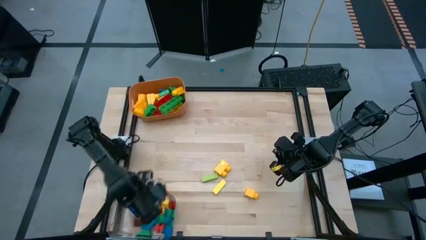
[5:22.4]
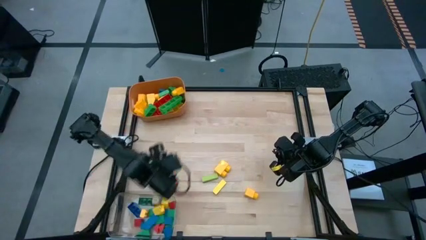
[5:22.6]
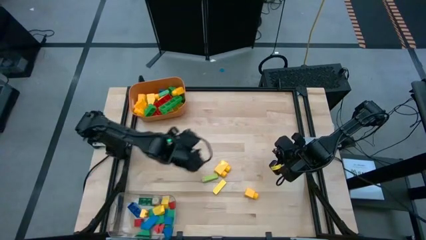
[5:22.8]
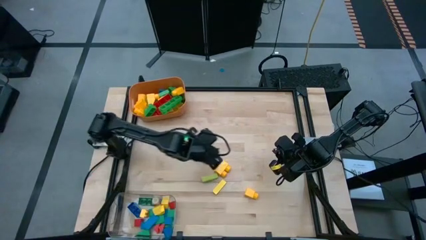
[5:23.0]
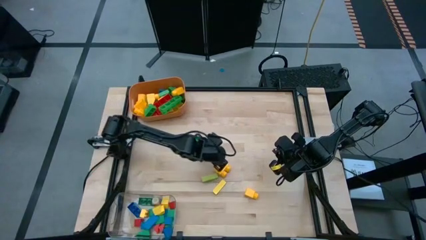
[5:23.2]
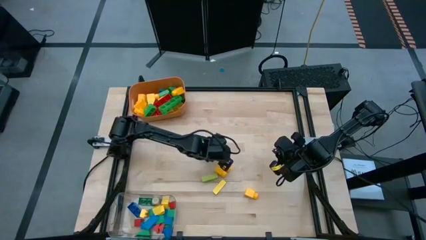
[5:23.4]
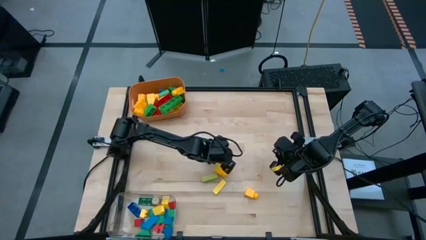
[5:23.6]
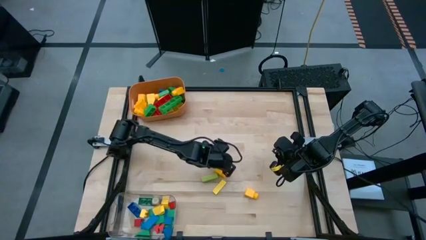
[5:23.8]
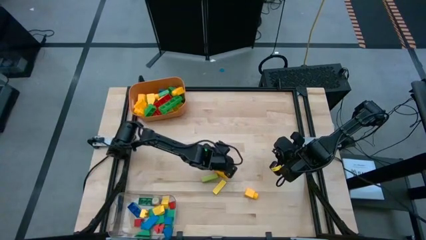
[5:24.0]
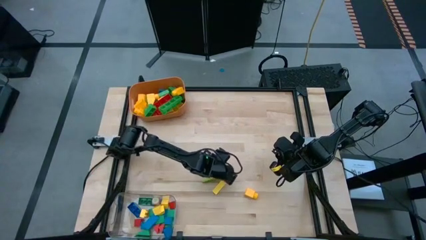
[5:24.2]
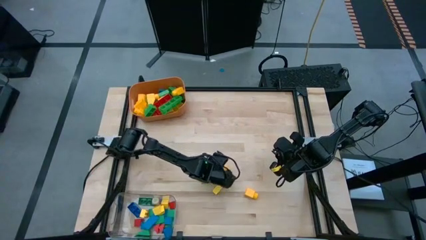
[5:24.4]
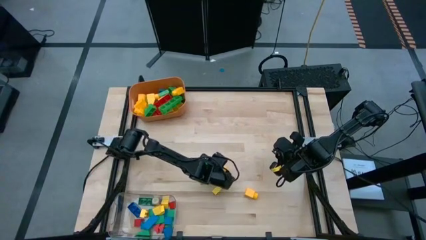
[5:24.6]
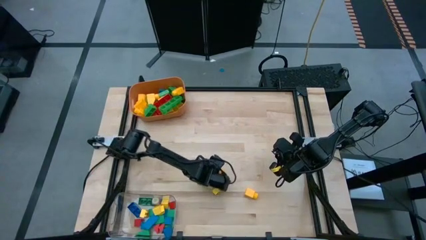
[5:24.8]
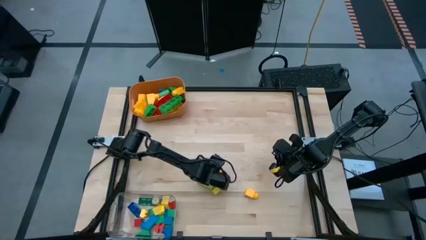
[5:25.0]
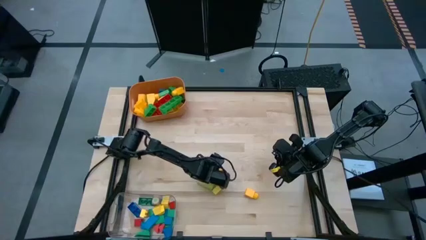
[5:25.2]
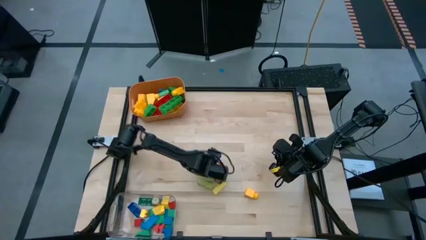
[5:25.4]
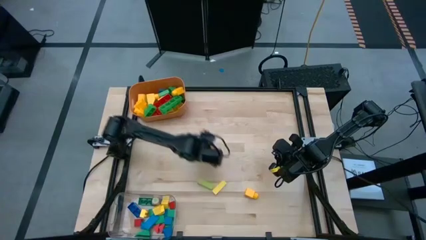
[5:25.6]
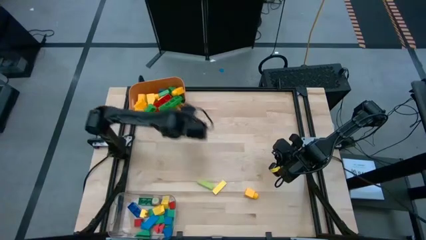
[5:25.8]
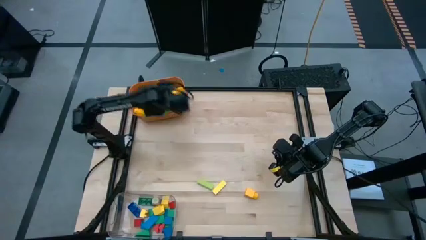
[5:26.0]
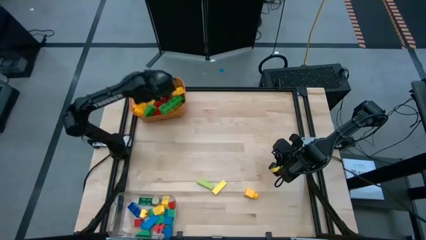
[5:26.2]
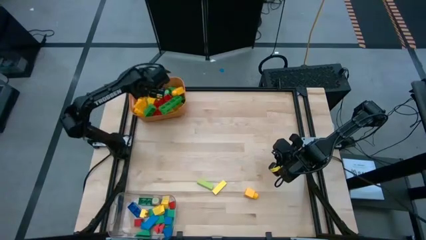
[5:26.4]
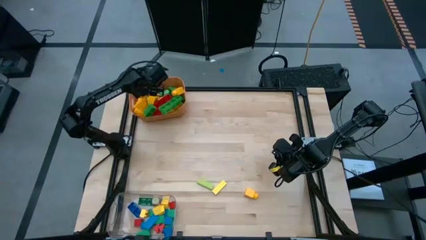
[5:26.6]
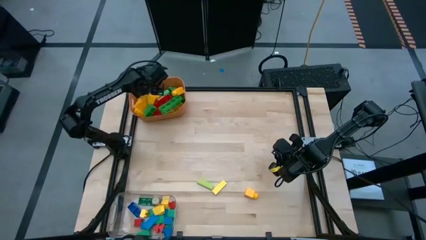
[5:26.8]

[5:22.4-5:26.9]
Task: Sort blocks by size
Put the big yellow game piece into the orange bin

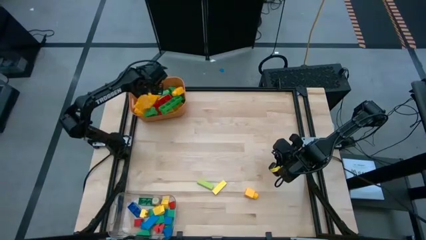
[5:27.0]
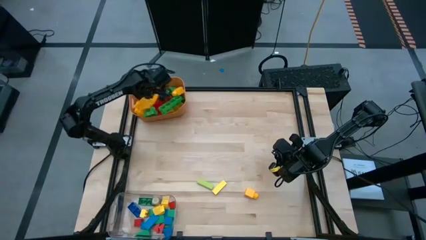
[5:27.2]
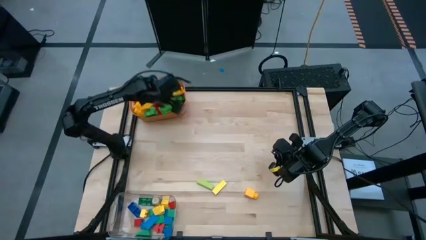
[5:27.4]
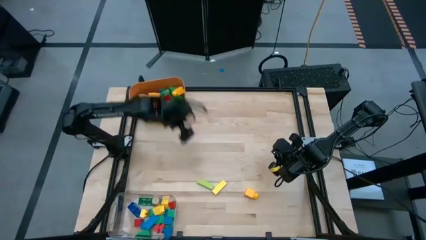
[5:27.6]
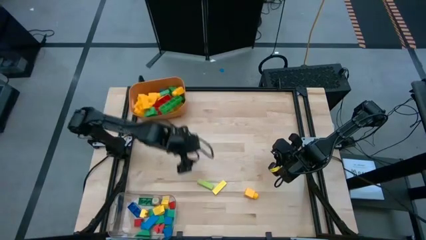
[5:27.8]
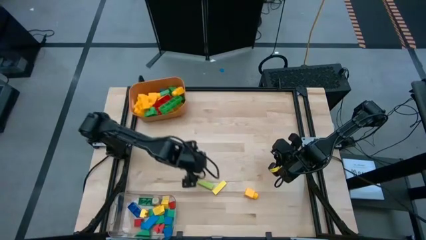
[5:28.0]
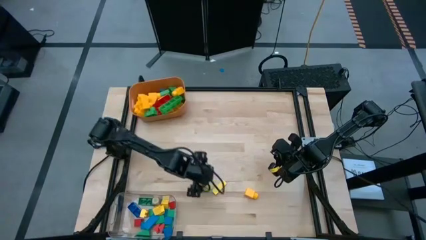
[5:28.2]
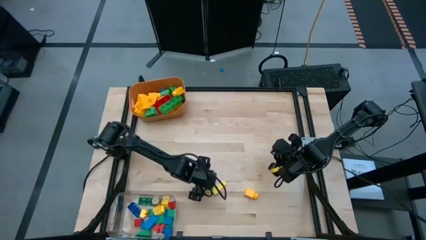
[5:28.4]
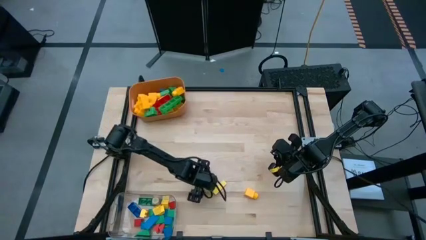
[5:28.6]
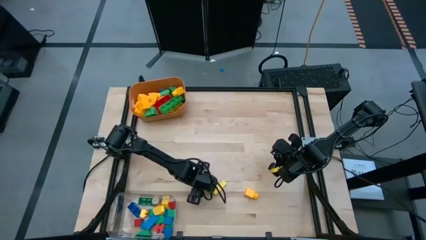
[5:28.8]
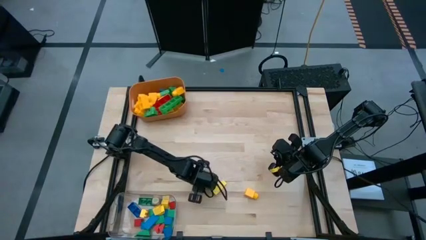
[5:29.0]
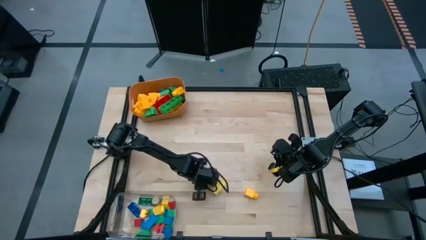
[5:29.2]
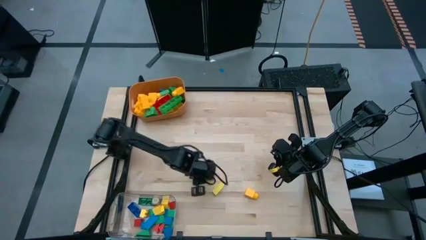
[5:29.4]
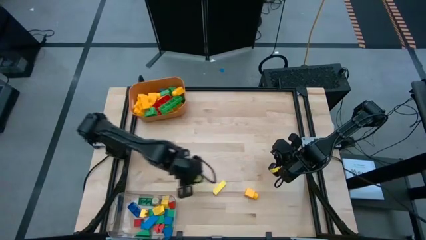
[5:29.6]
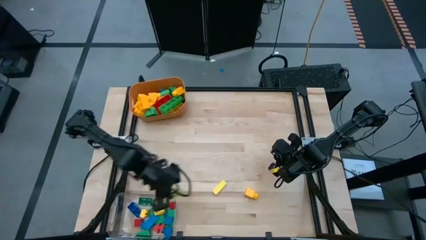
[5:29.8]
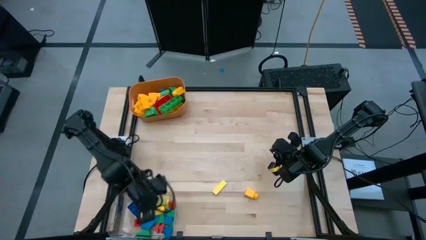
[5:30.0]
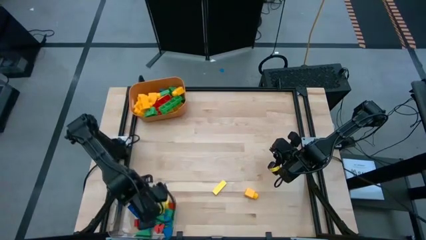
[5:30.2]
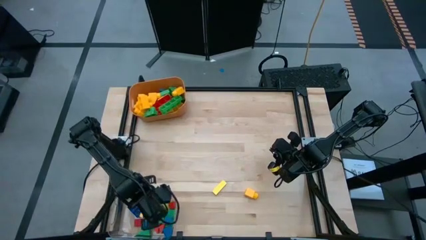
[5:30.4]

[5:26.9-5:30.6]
Put the big light green block into the transparent bin

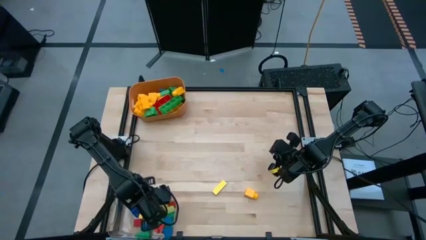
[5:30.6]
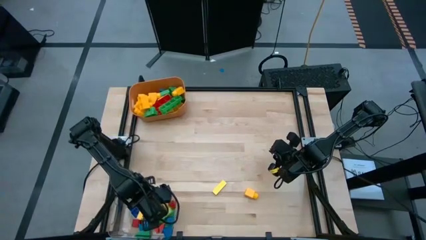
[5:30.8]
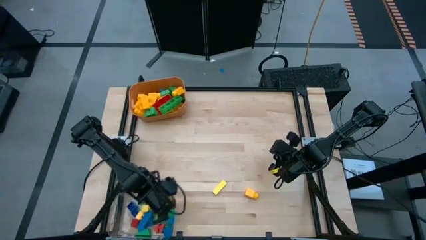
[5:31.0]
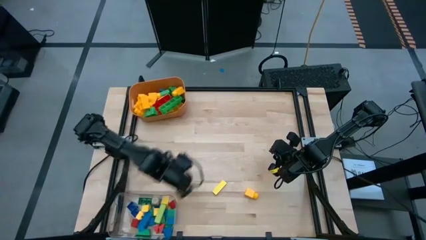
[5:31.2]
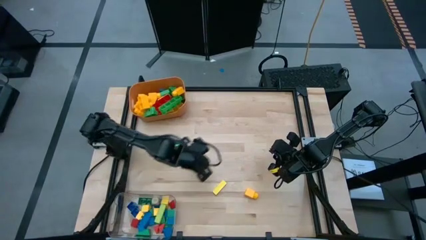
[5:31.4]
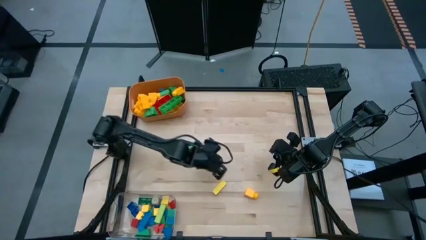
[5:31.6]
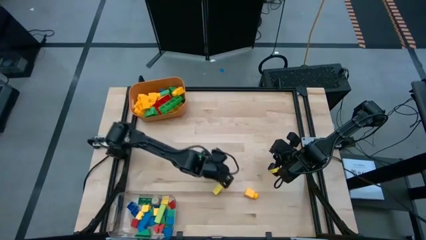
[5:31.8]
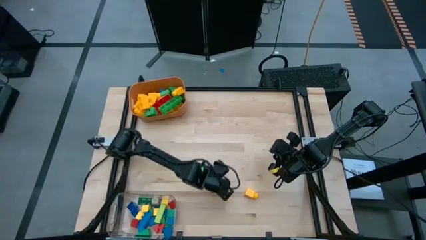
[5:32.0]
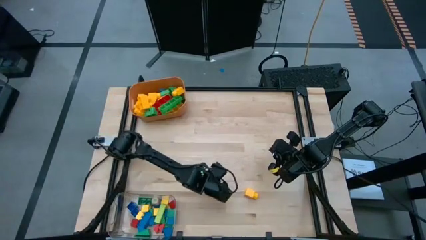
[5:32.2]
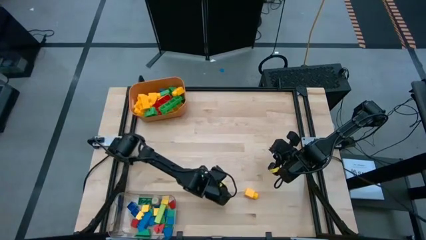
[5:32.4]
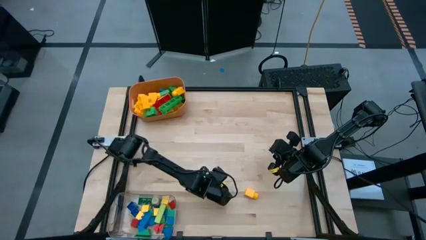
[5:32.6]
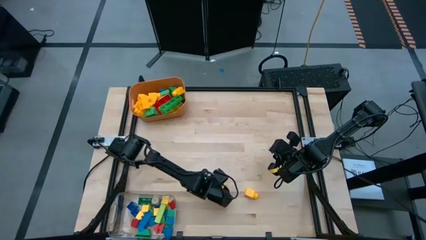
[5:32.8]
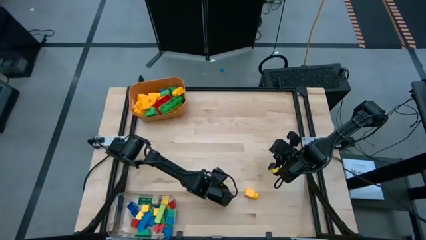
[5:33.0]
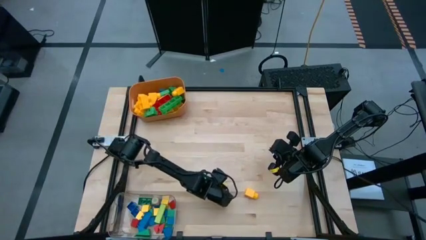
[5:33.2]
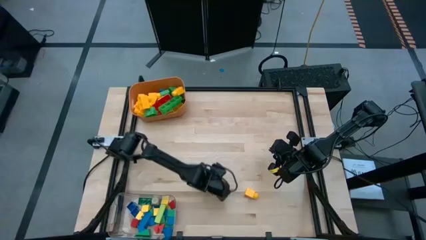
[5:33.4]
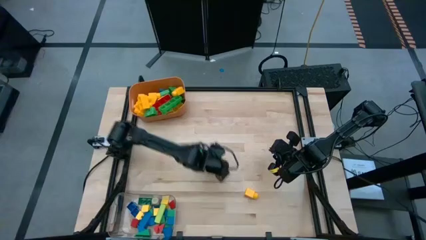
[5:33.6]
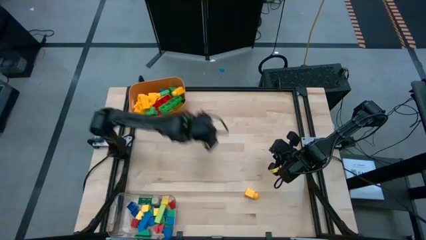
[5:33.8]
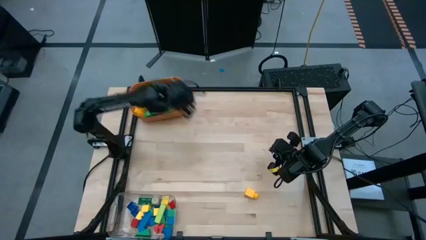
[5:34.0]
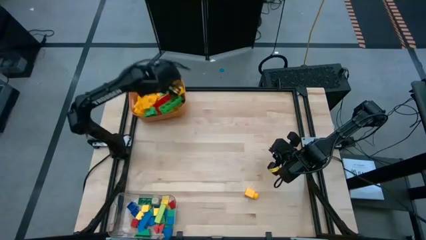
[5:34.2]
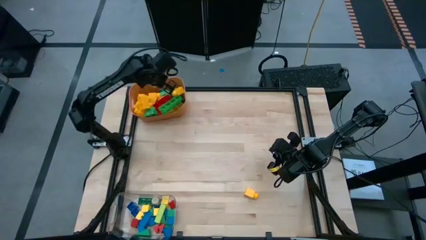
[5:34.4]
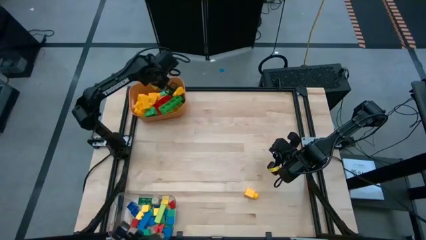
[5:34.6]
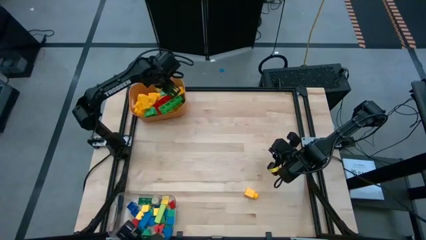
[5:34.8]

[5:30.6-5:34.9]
Put the big yellow block into the orange bin

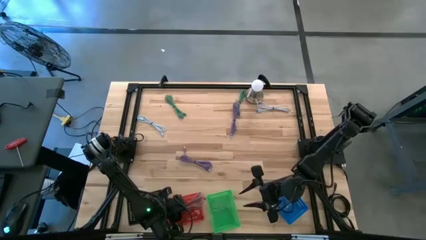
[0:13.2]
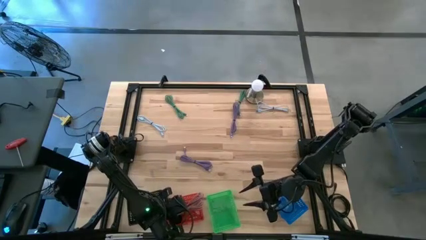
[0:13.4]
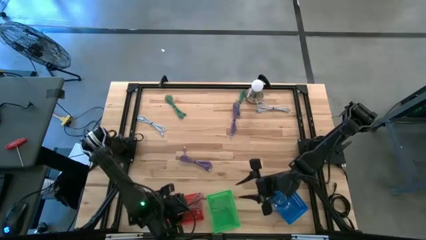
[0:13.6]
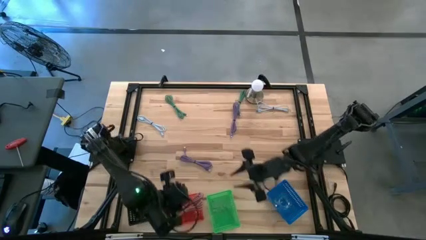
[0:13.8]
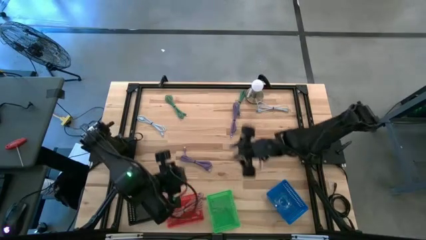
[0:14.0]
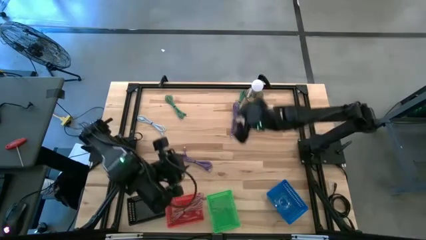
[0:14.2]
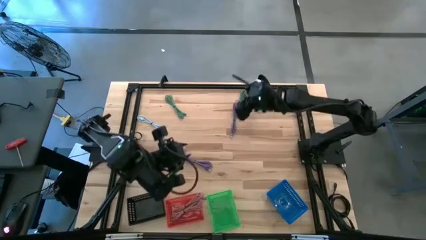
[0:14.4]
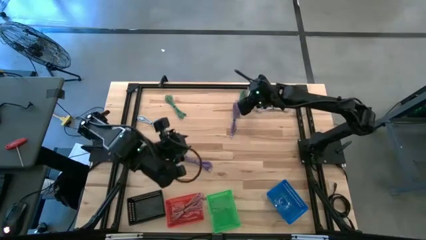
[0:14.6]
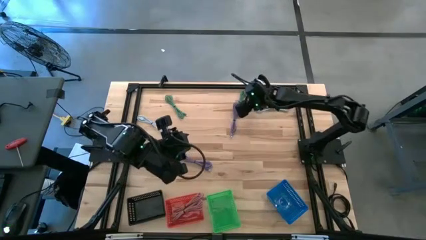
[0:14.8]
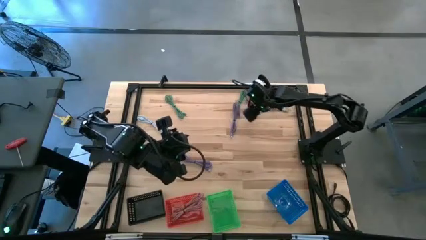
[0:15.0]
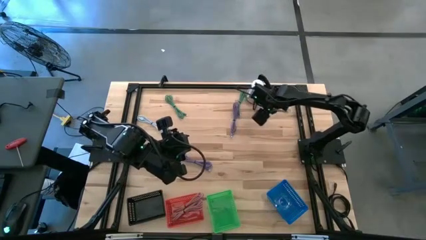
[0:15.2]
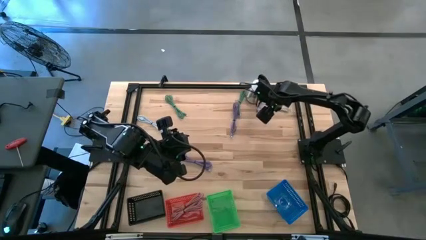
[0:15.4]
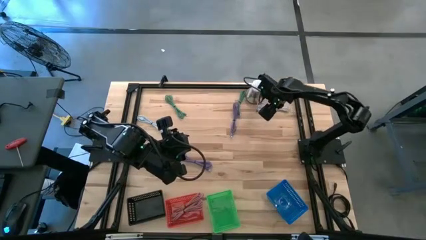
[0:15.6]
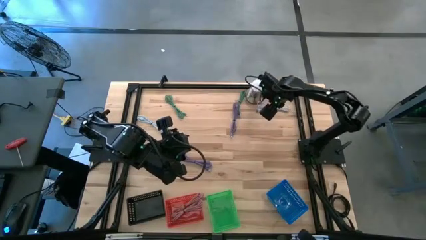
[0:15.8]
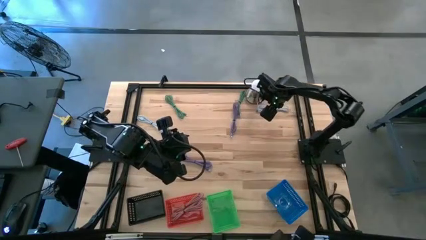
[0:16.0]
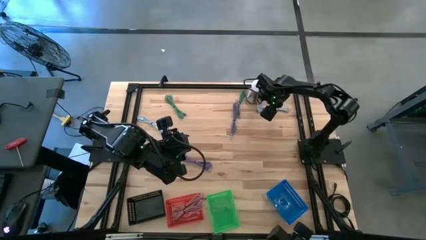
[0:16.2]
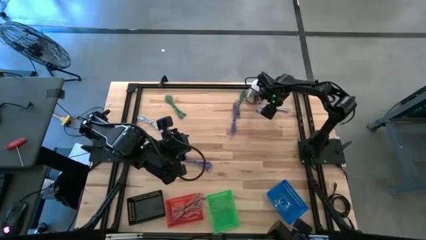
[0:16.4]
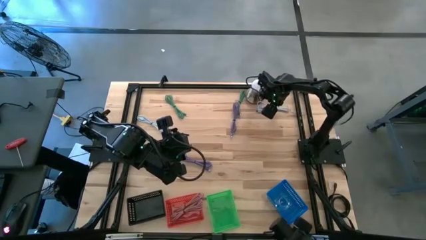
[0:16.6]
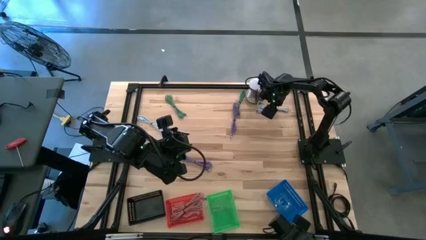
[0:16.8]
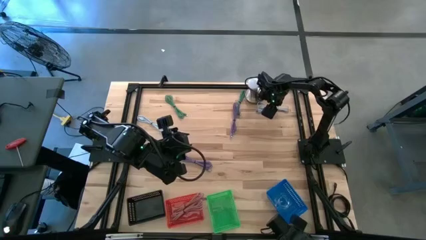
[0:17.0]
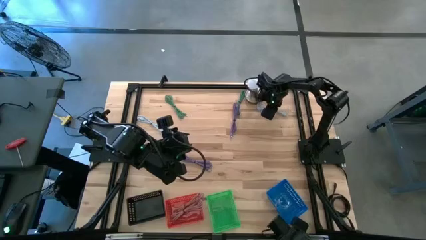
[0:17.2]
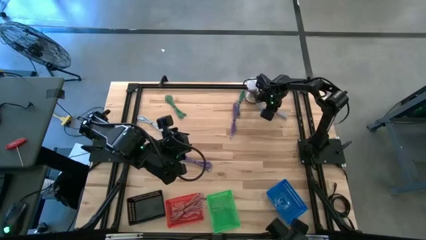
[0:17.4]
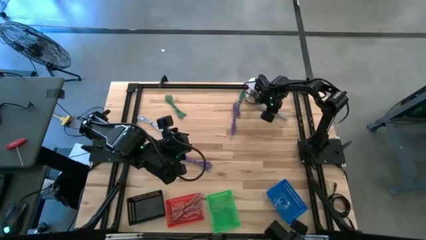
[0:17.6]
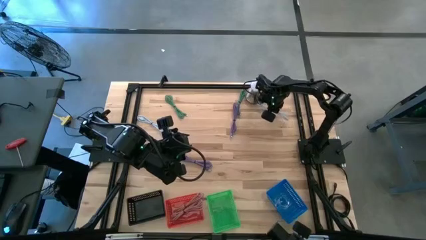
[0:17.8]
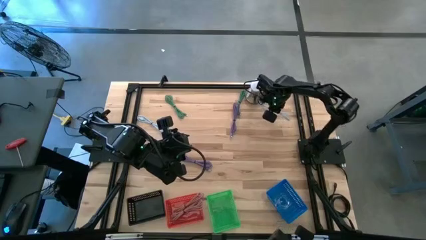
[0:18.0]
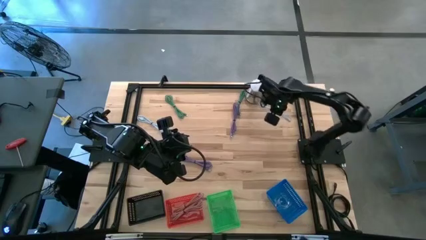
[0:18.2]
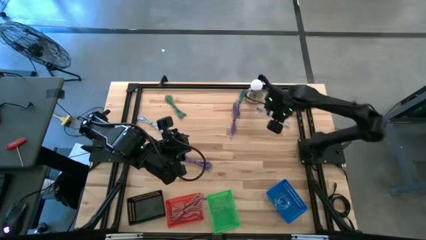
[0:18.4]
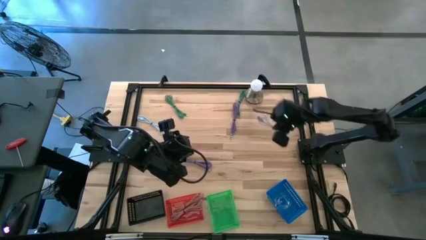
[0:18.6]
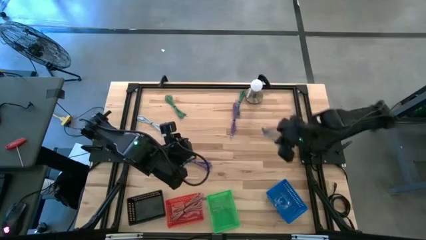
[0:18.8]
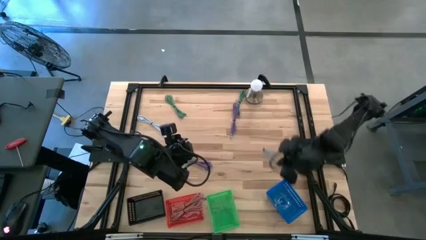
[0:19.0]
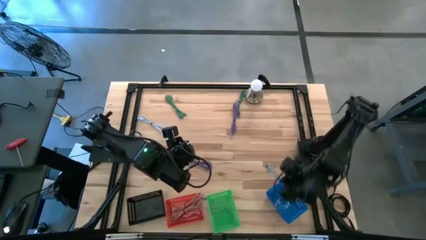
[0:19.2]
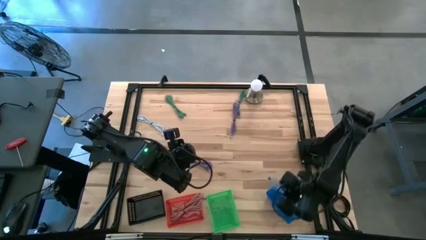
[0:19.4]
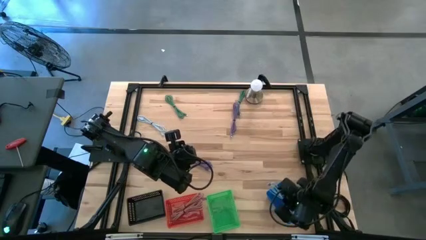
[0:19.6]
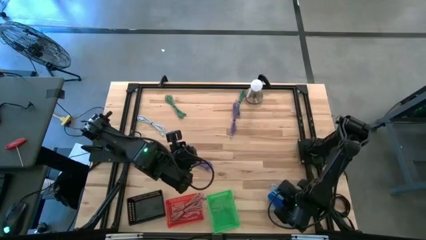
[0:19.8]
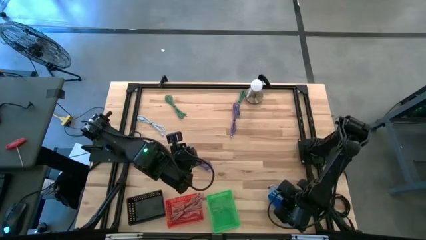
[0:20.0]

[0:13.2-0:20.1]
Task: Pick & Place USB Port
Put the blue USB charger into the blue bin
